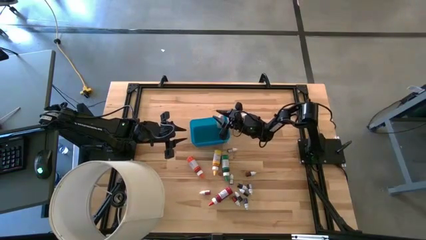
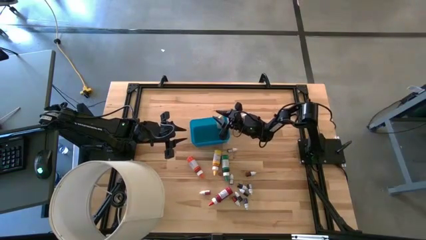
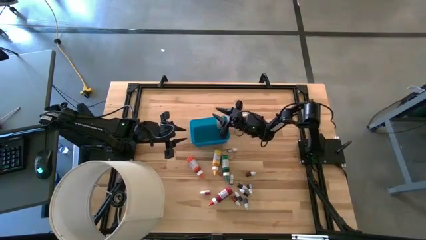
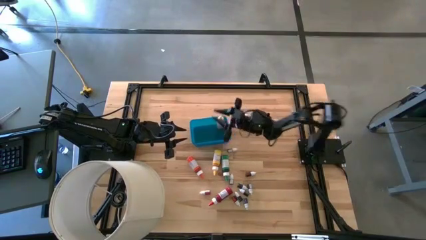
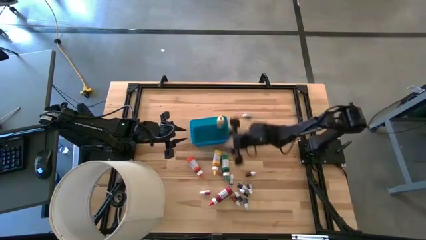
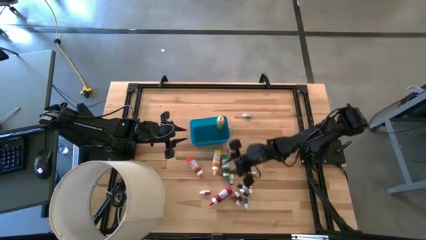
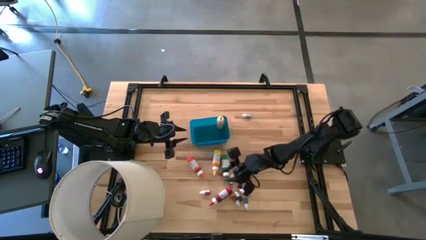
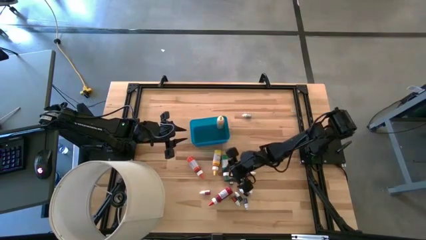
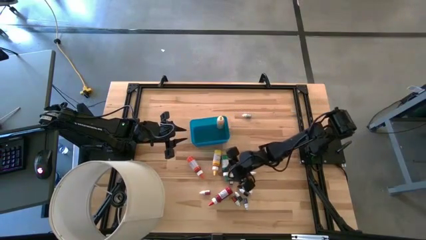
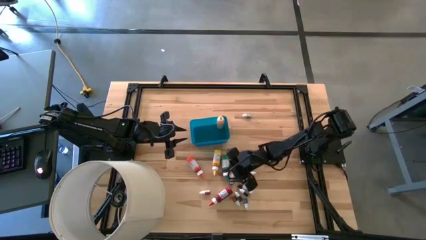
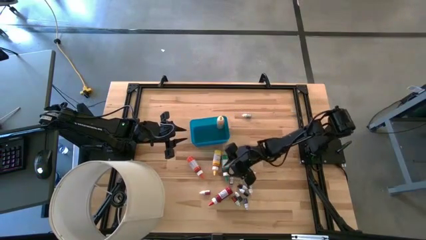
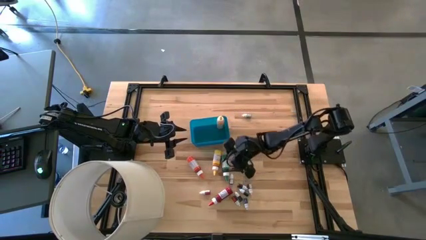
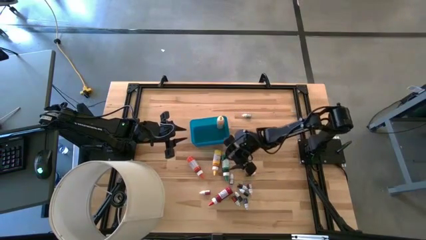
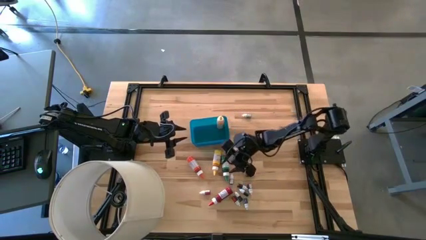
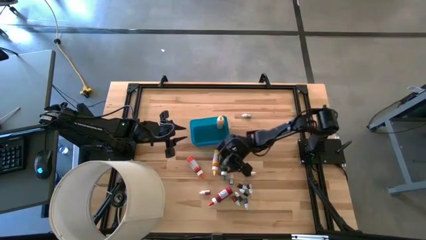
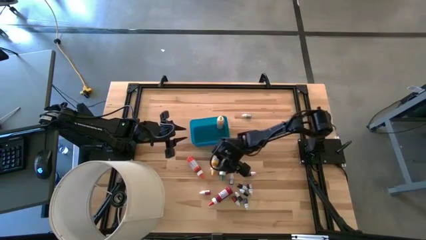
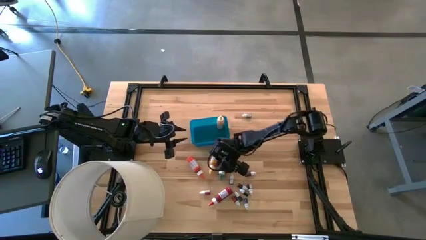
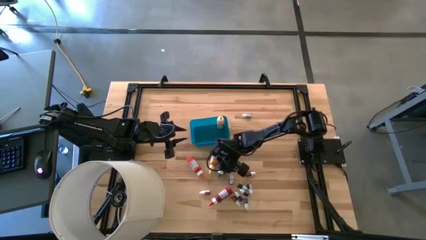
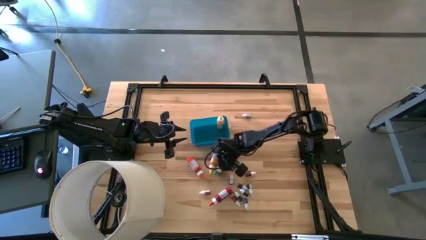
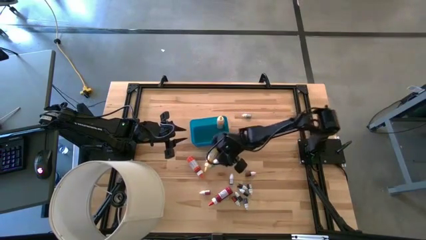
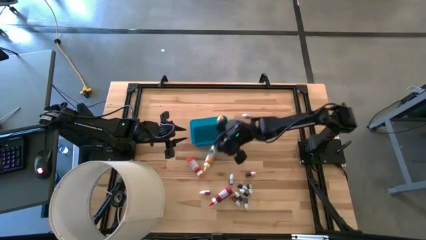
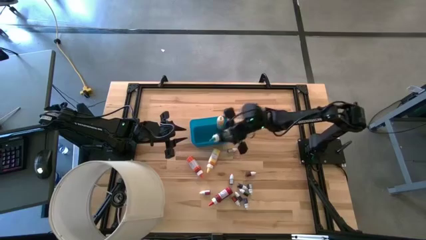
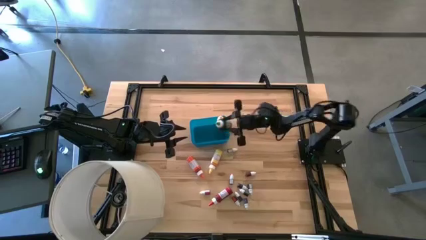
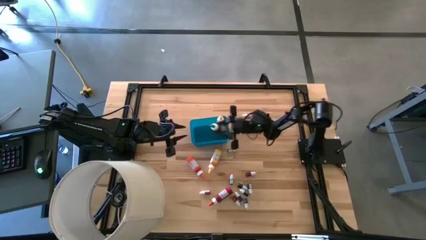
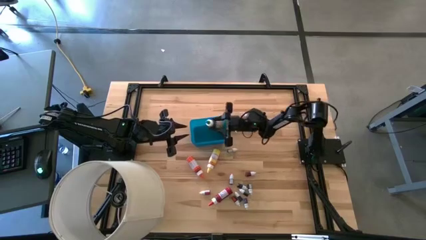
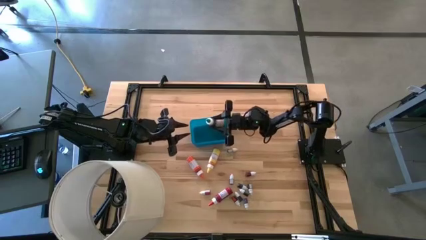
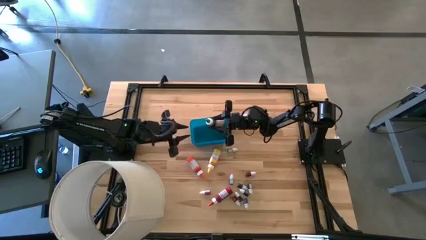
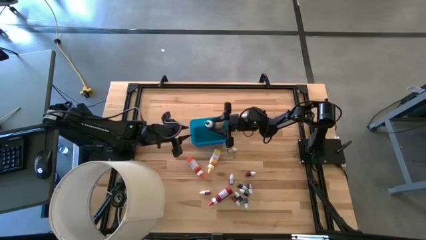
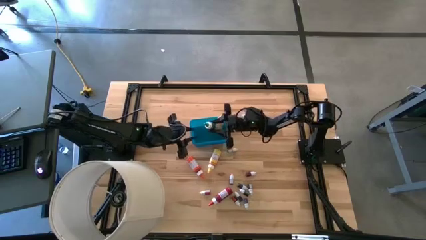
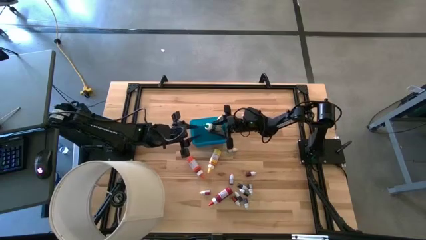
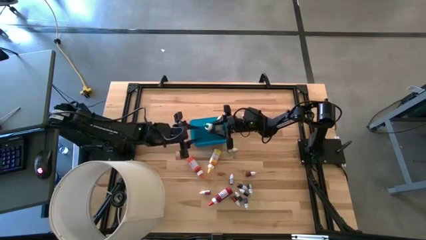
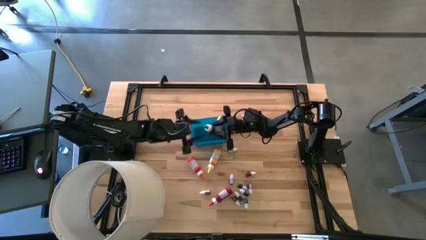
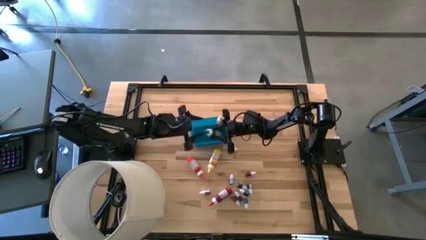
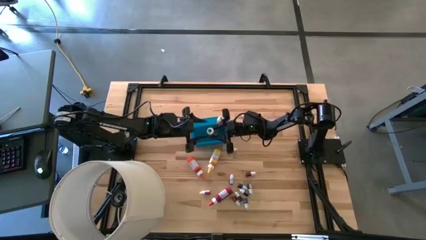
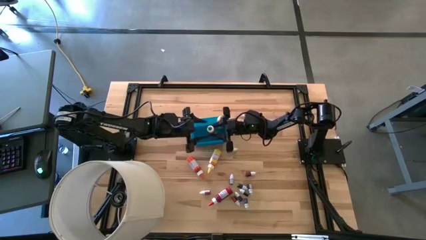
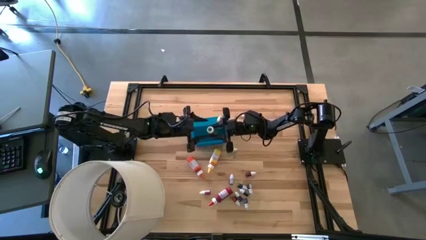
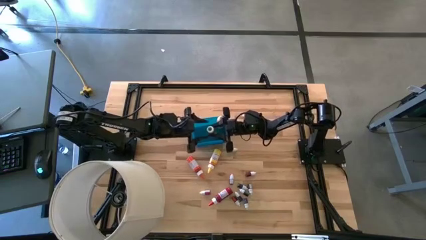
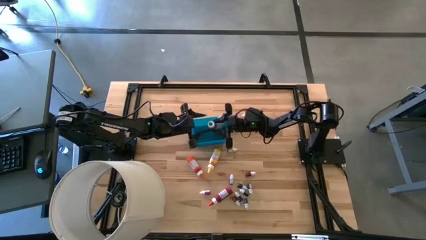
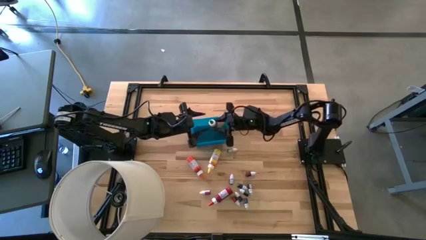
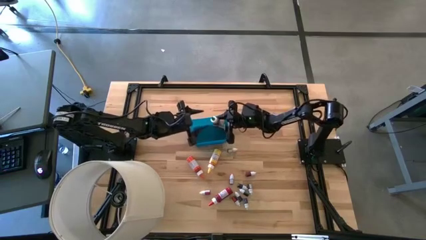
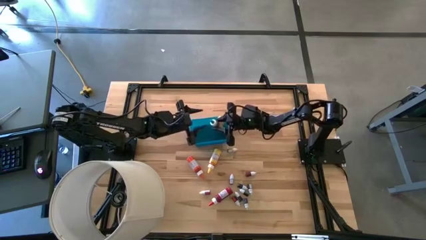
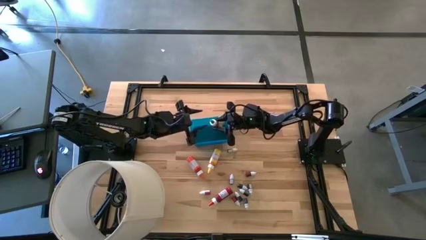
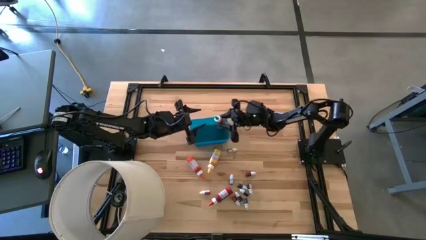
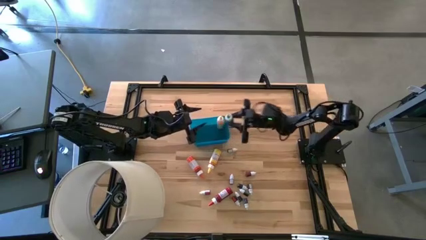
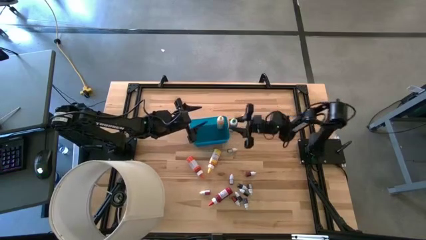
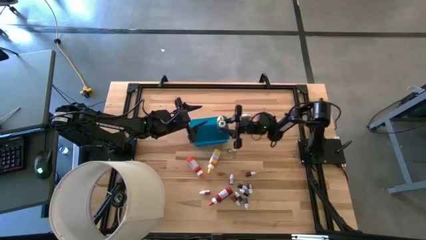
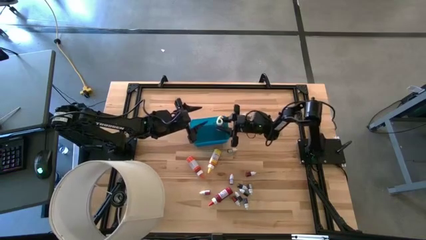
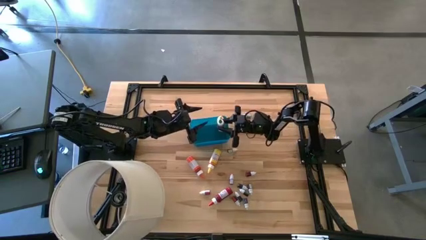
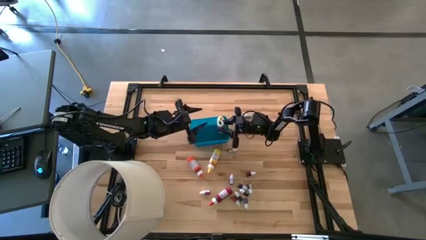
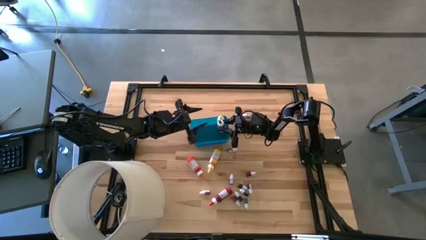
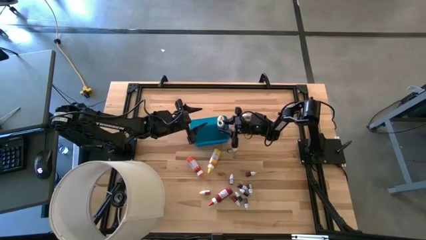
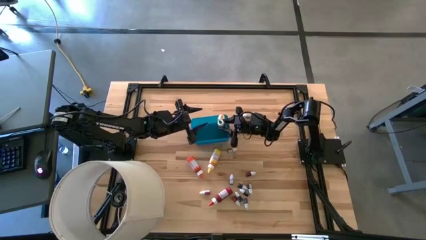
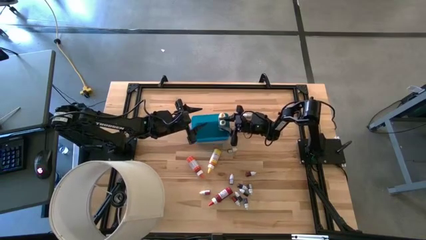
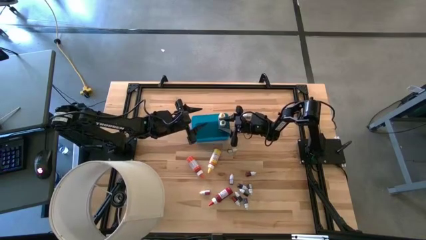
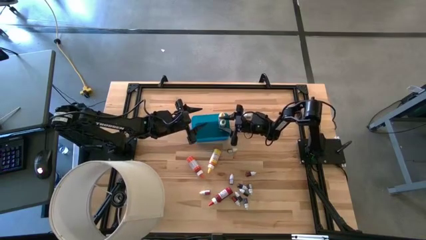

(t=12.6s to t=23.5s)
Task: Pick & Place food coloring
Put the big green food coloring bottle into the bin

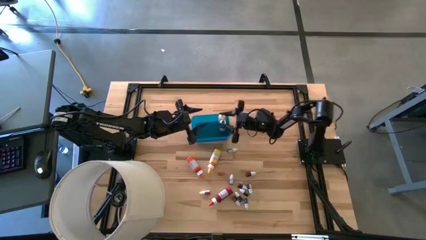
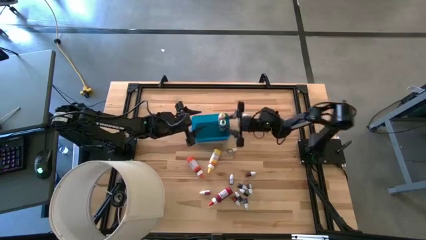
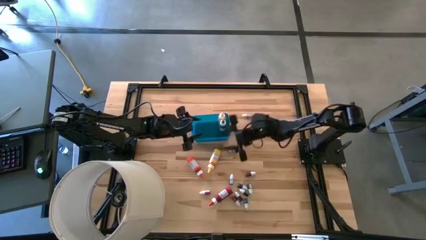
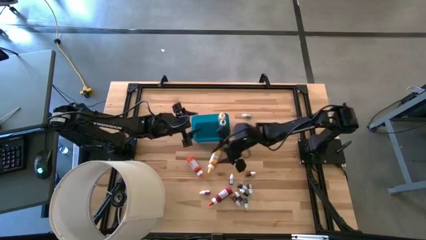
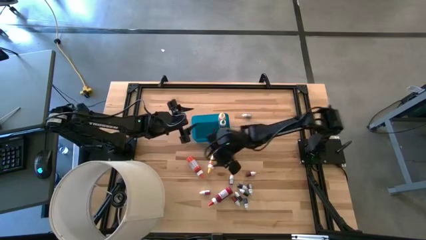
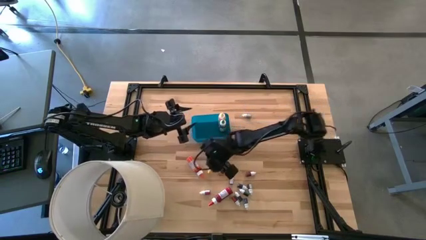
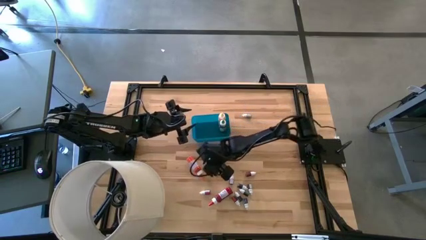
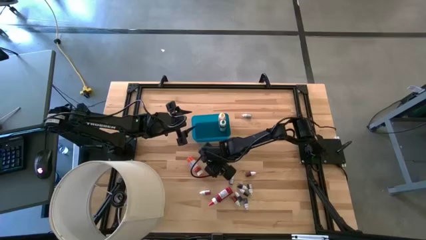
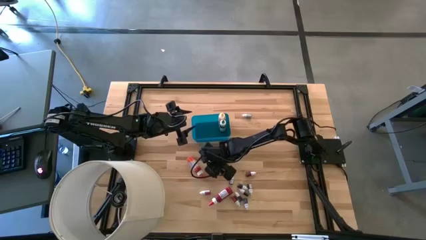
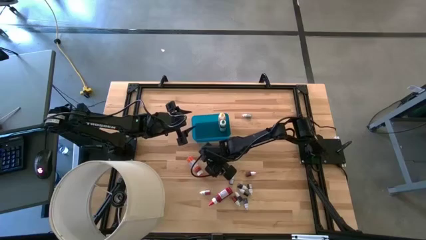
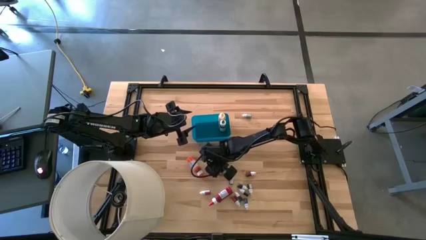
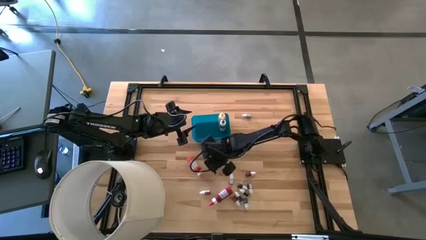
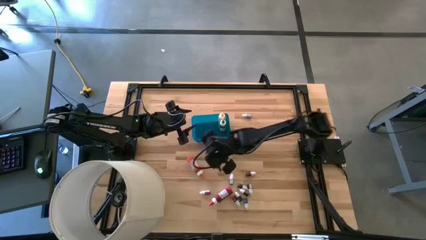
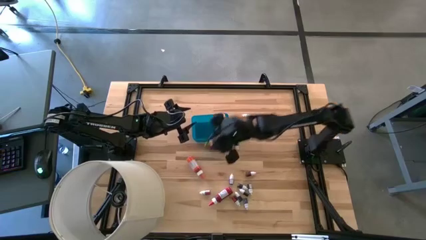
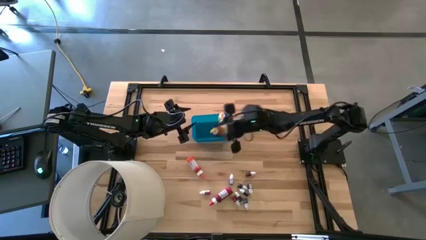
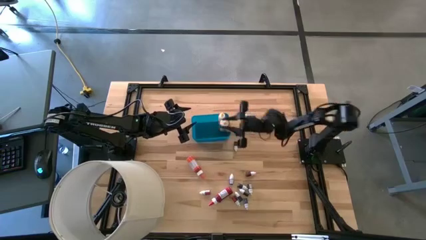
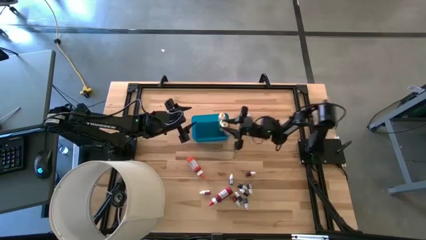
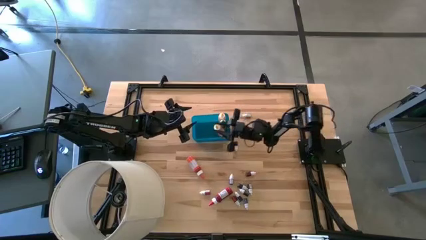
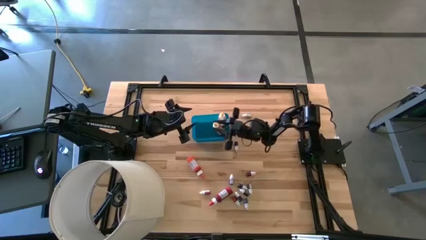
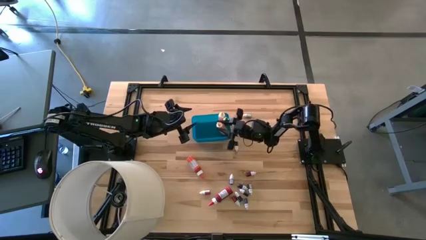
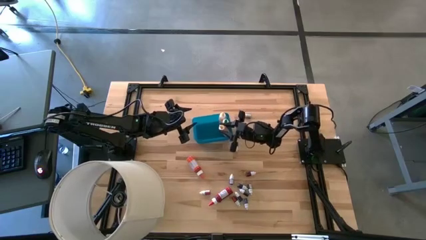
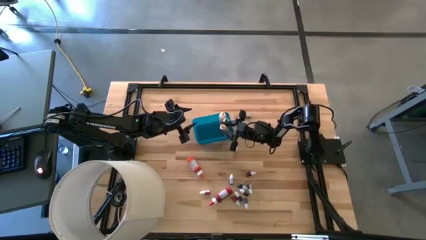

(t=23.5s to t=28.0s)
Put the big yellow food coloring bottle into the bin
